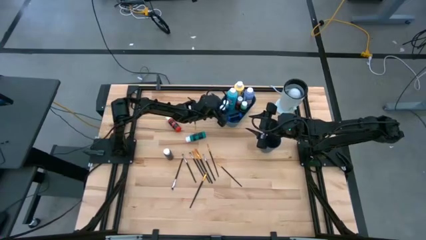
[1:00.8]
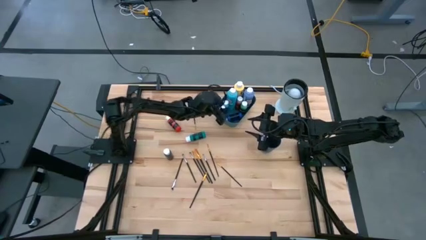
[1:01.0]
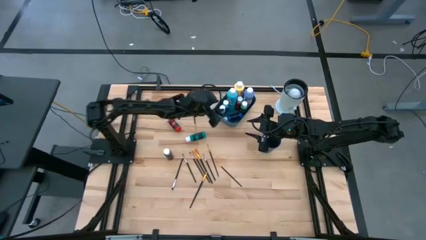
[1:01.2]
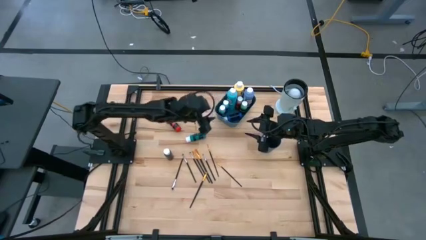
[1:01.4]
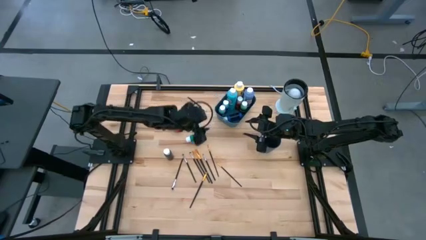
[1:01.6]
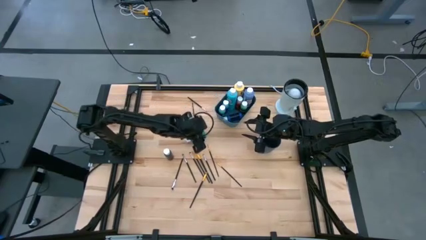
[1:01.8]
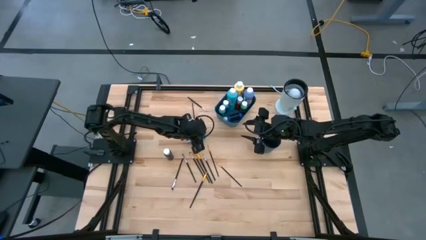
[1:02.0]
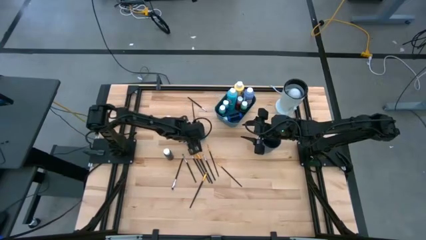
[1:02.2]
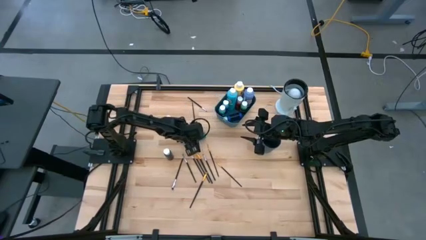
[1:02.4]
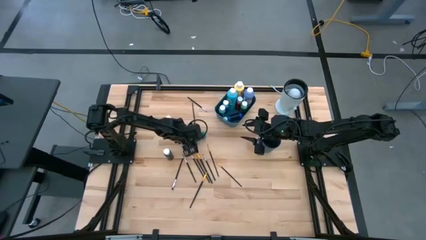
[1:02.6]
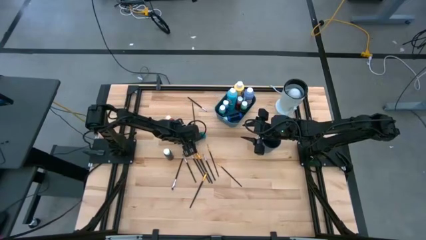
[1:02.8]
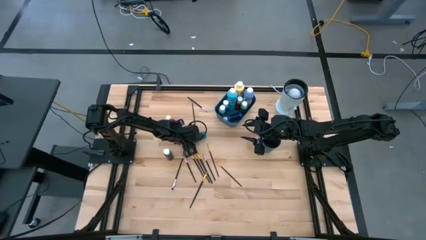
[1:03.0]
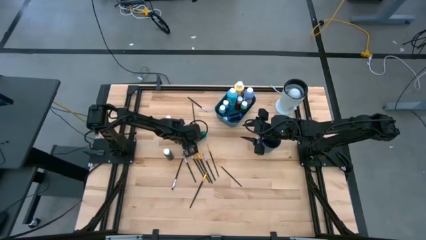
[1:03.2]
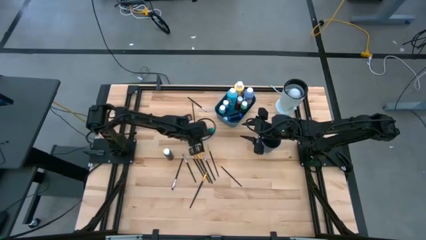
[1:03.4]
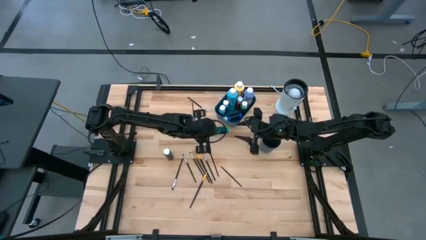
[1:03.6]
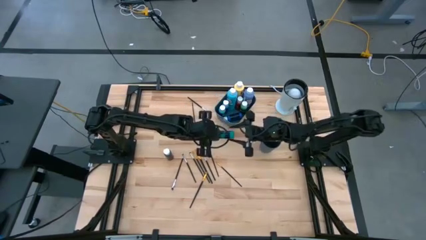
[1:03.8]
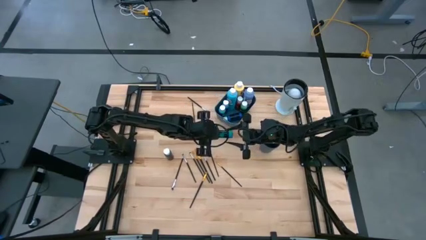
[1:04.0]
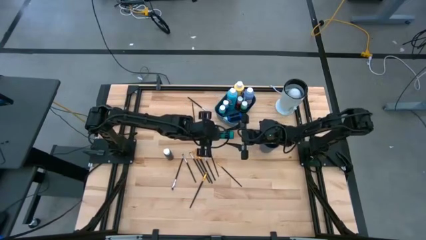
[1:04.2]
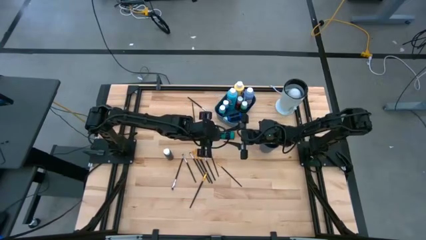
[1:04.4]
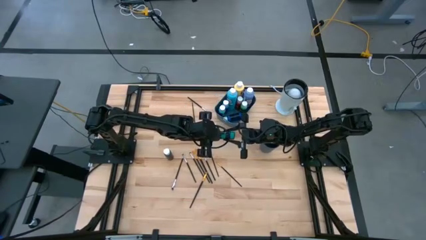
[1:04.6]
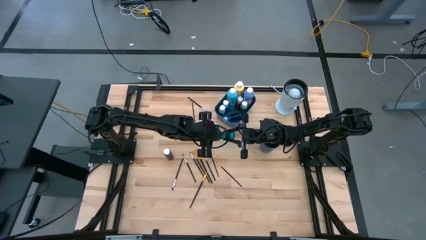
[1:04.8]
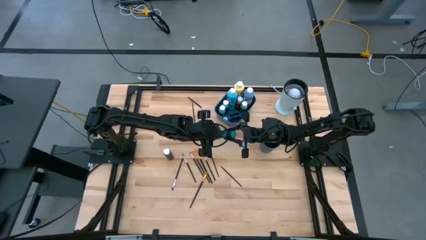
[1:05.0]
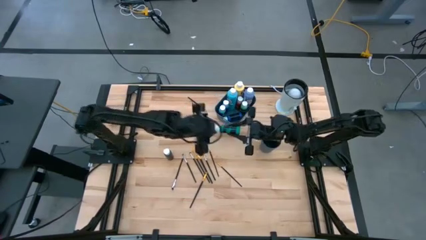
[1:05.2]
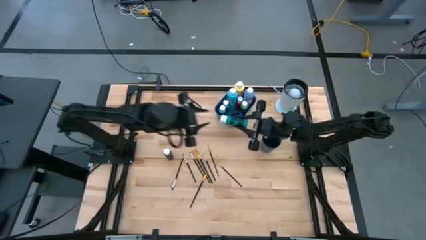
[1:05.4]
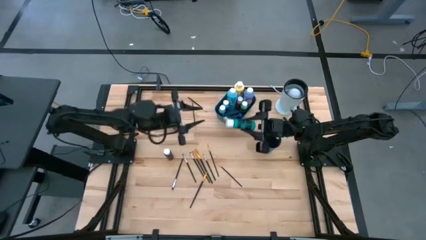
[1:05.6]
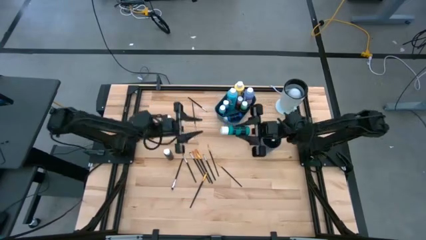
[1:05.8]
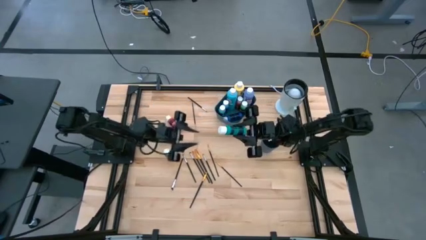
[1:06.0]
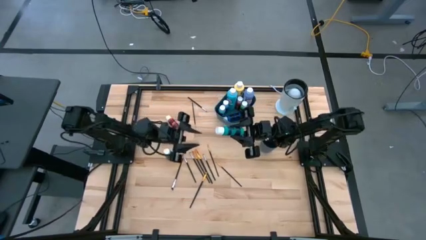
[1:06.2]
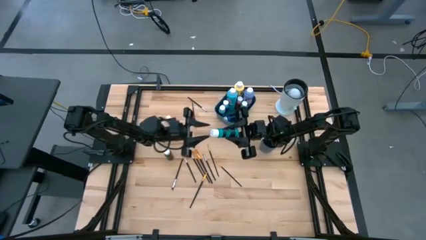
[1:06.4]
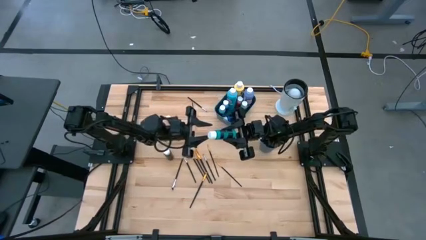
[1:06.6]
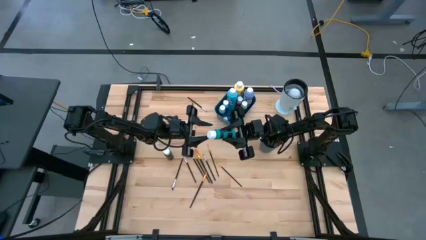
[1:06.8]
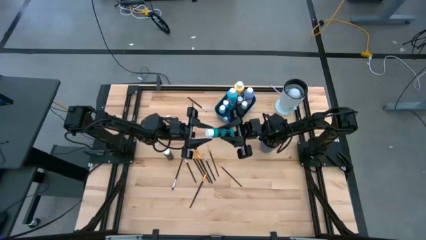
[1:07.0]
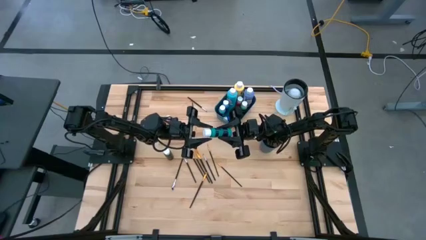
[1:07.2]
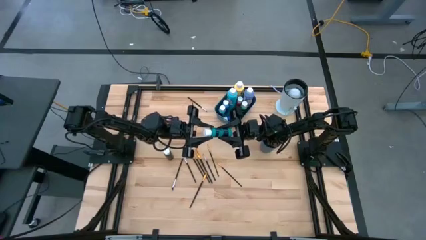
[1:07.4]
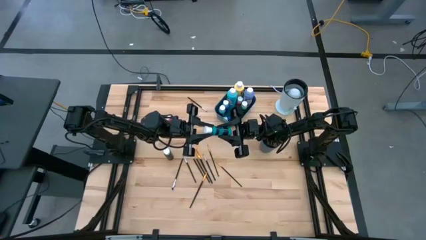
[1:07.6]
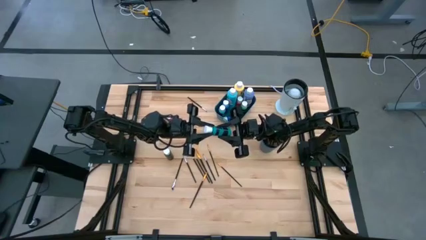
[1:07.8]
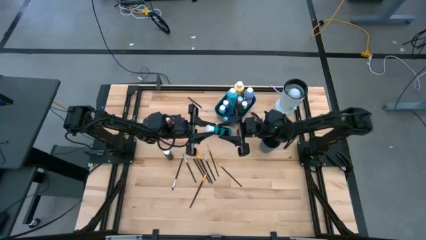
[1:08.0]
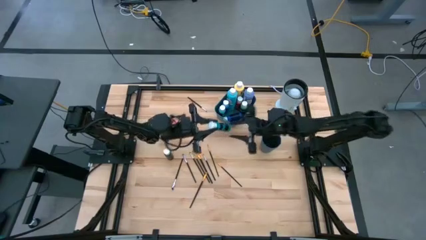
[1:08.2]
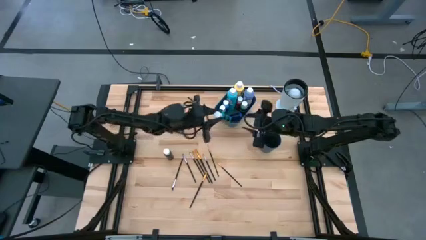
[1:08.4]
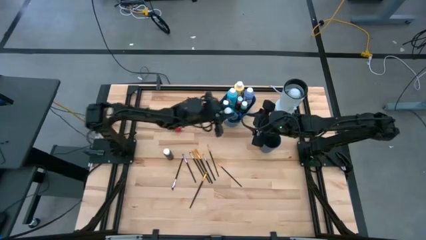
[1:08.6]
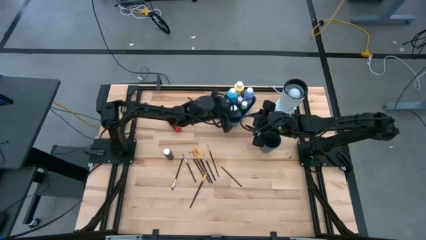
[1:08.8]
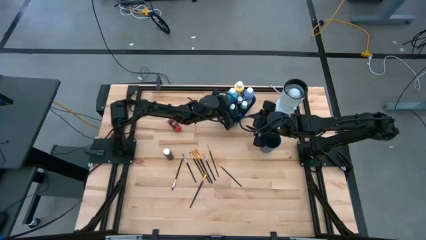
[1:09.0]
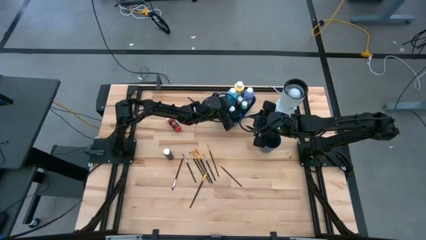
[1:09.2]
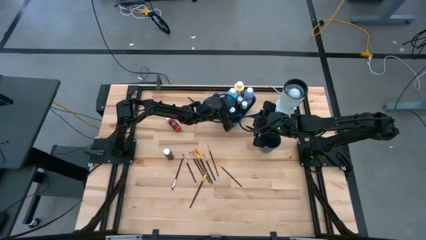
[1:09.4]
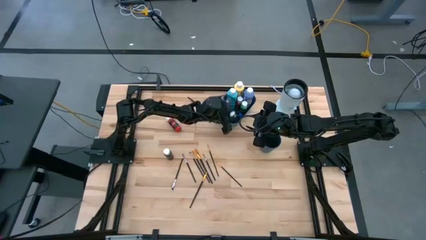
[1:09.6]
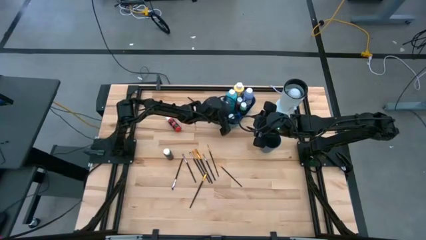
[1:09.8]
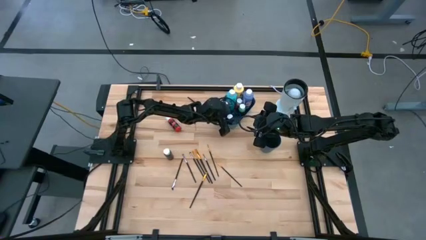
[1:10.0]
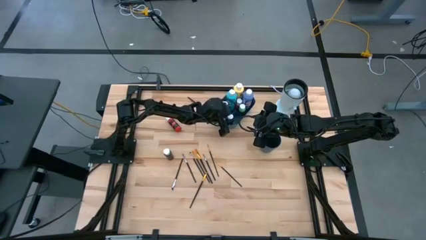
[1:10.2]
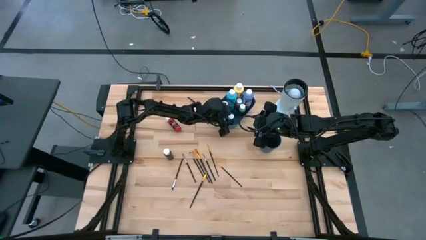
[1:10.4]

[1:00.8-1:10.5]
Task: Pick & Place Paint Supplies
Put the dark green paint bottle into the blue bin

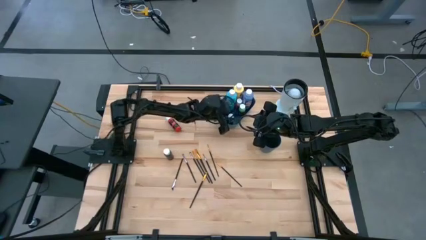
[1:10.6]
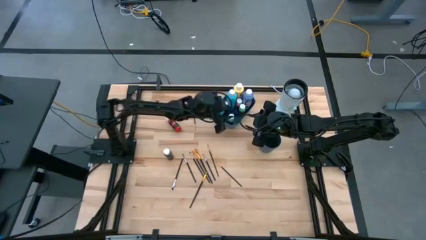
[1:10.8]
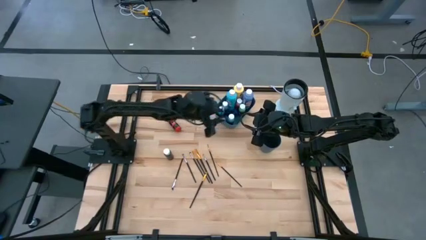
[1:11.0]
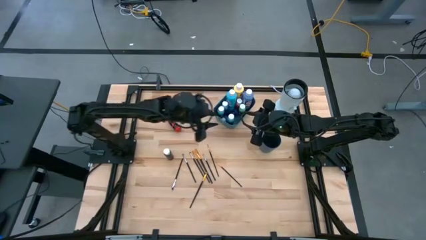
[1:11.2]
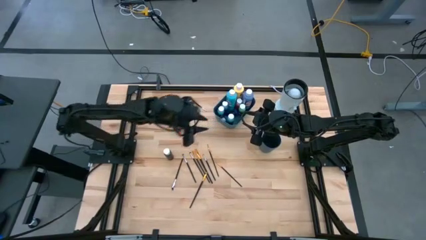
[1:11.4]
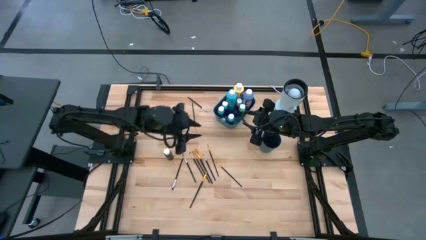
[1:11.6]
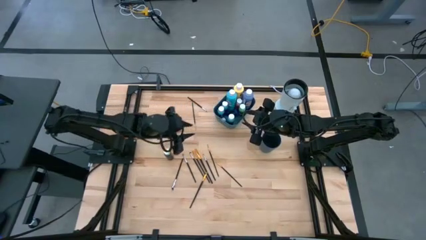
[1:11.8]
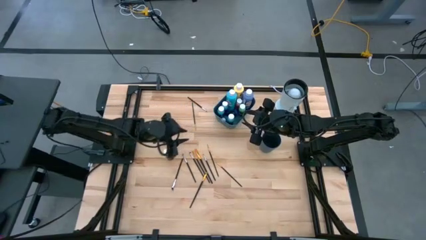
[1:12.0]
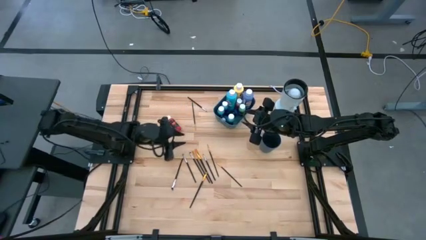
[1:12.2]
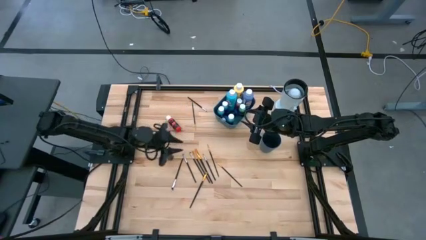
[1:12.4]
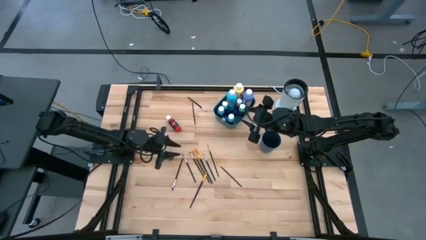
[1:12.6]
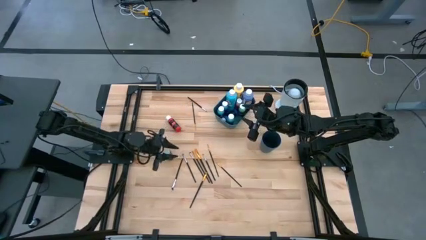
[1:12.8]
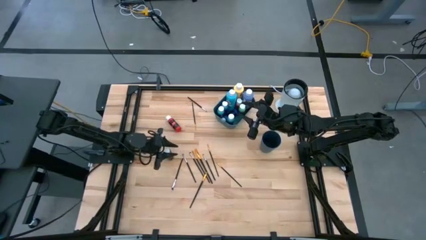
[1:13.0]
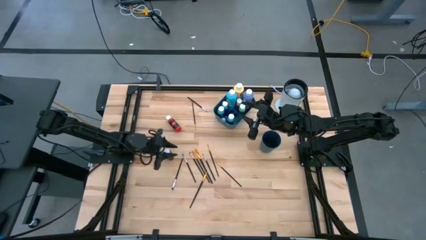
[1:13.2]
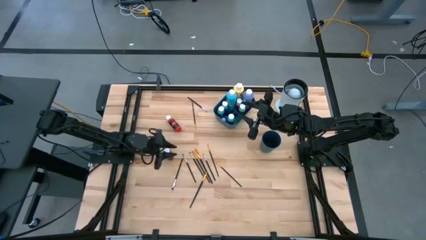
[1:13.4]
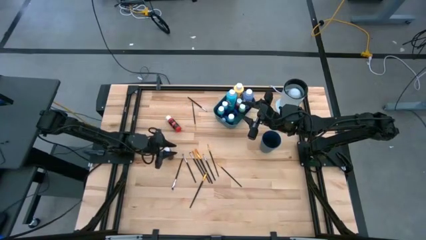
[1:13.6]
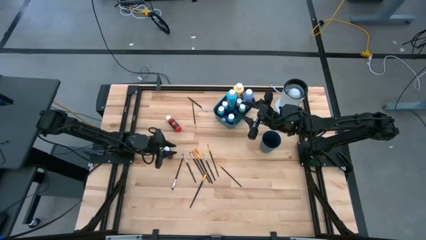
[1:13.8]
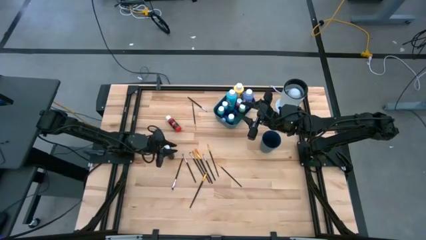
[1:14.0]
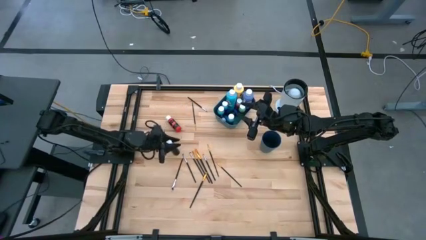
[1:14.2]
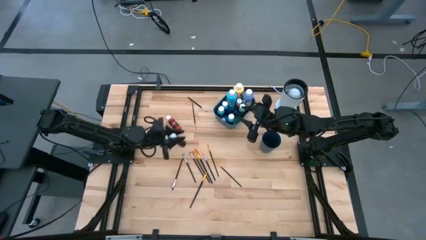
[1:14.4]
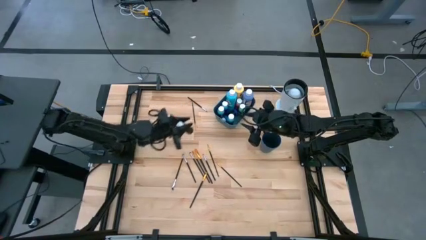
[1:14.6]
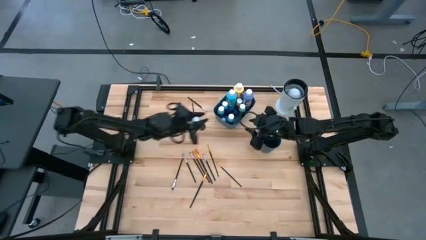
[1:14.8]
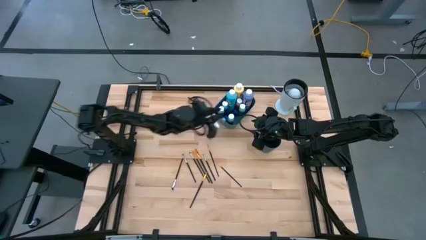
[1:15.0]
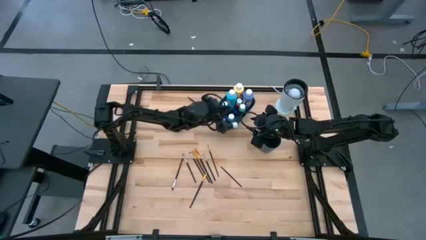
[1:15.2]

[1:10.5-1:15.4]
Put the black paint bottle into the blue bin

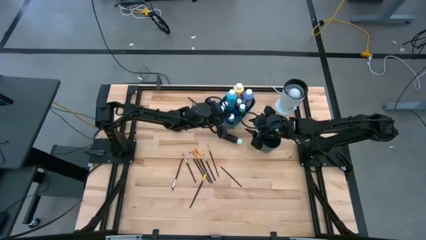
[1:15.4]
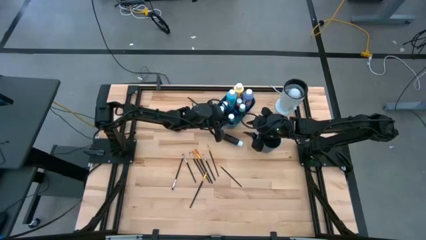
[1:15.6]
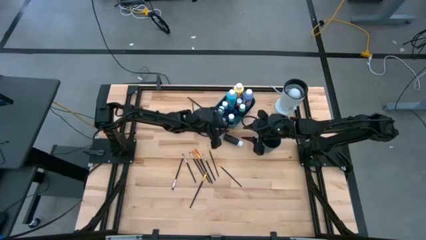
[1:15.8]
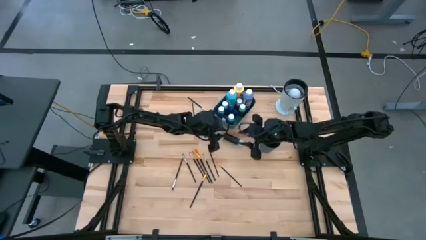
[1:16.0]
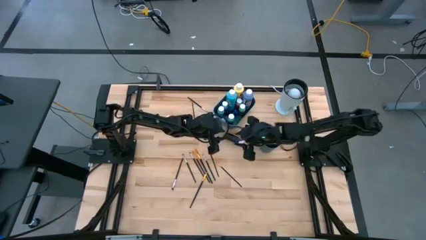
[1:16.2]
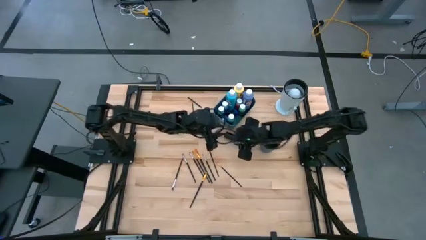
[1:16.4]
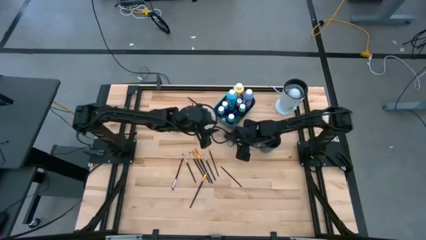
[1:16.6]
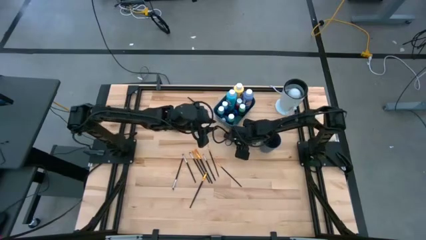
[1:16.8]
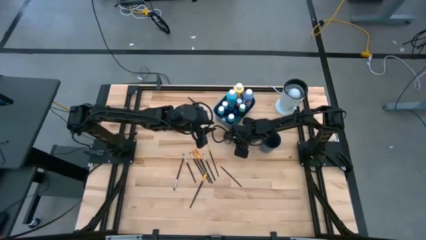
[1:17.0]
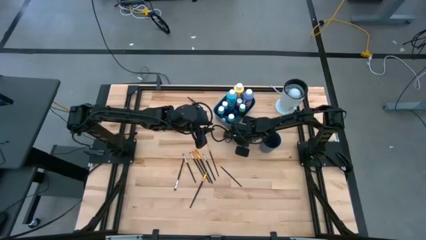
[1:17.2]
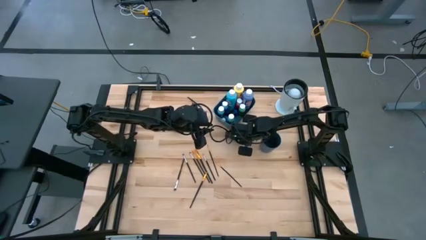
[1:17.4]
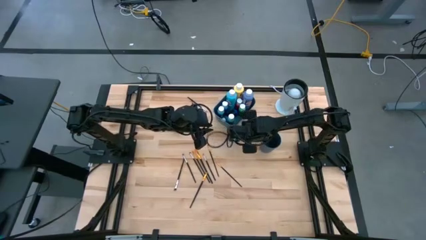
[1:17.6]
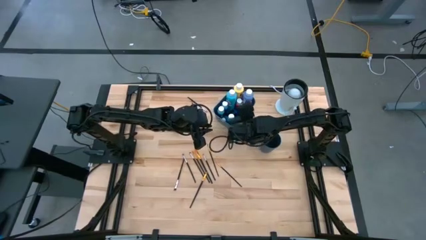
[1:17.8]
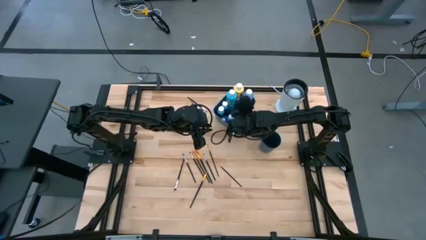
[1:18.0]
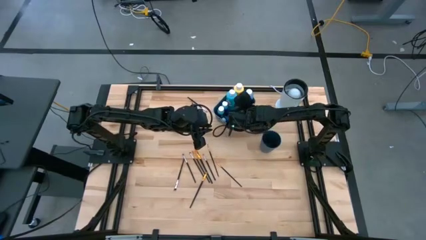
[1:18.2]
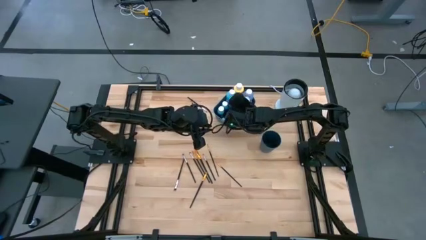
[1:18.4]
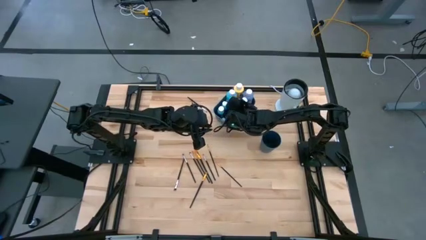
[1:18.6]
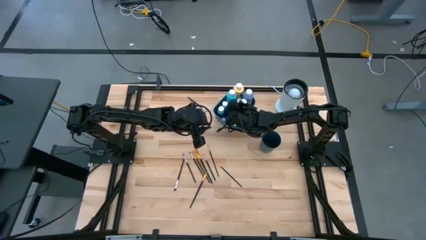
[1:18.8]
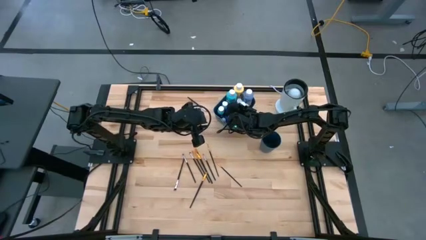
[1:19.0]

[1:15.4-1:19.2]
Put the black paint bottle into the blue bin
